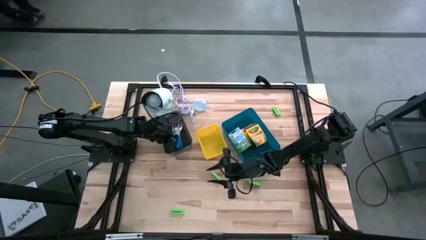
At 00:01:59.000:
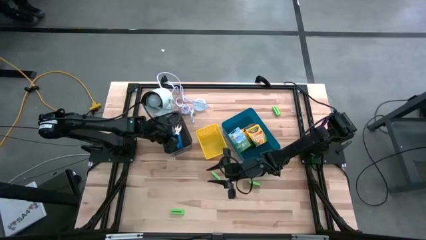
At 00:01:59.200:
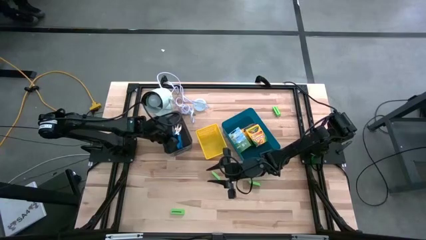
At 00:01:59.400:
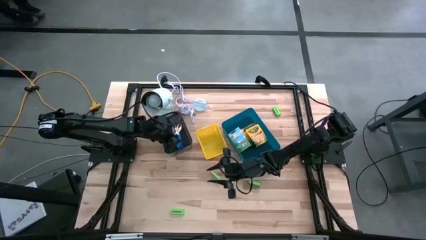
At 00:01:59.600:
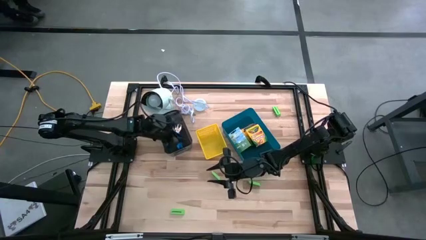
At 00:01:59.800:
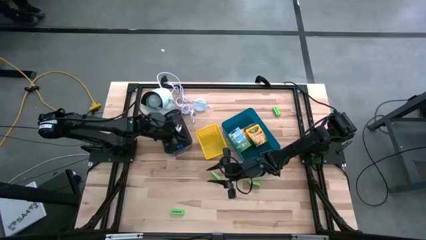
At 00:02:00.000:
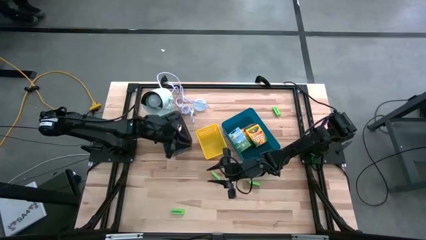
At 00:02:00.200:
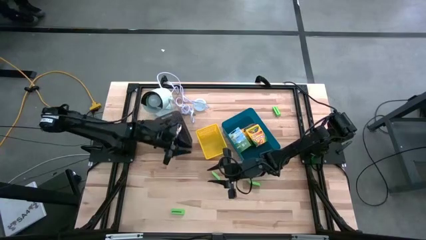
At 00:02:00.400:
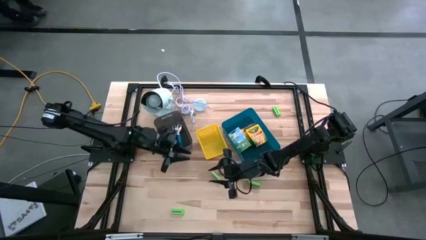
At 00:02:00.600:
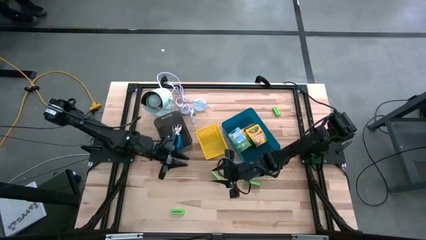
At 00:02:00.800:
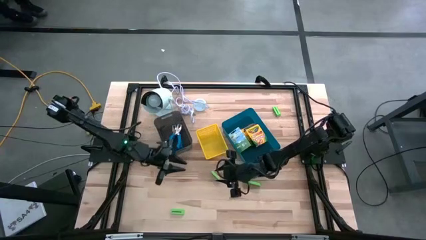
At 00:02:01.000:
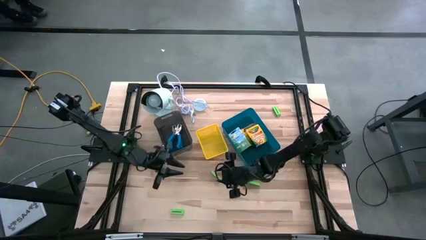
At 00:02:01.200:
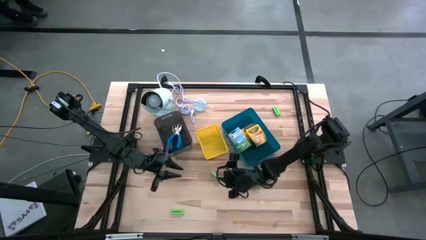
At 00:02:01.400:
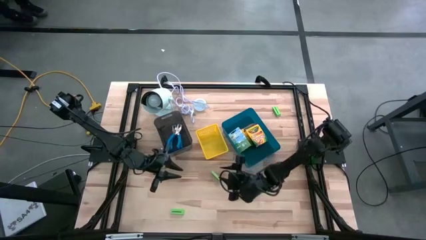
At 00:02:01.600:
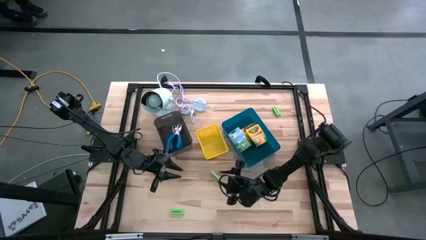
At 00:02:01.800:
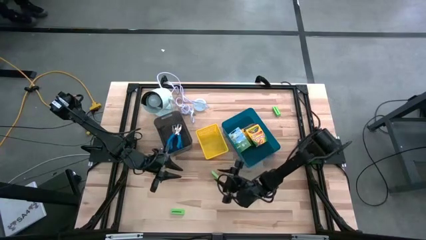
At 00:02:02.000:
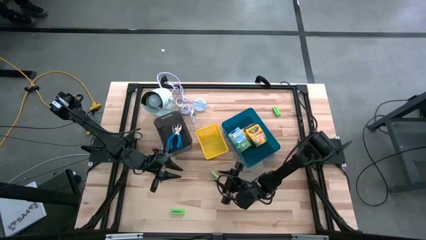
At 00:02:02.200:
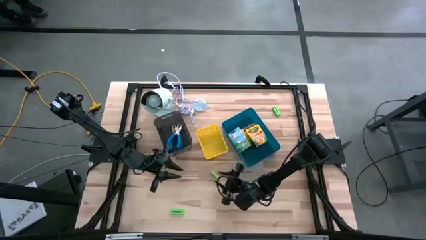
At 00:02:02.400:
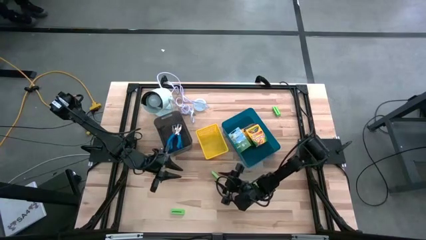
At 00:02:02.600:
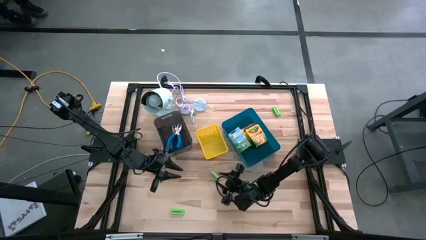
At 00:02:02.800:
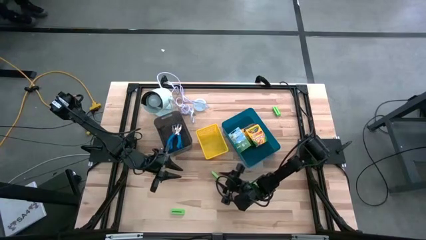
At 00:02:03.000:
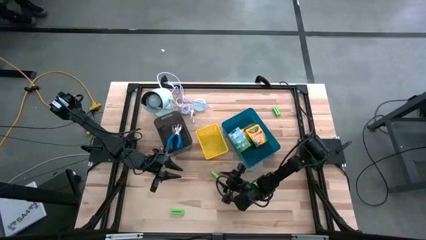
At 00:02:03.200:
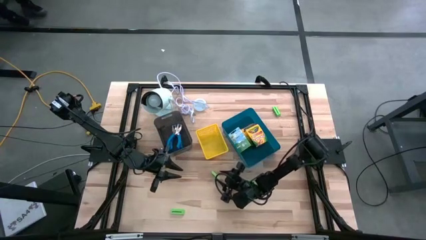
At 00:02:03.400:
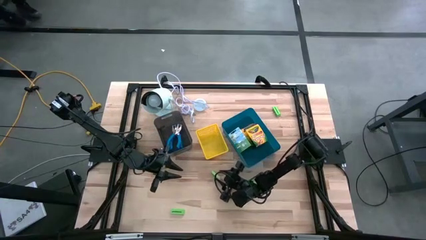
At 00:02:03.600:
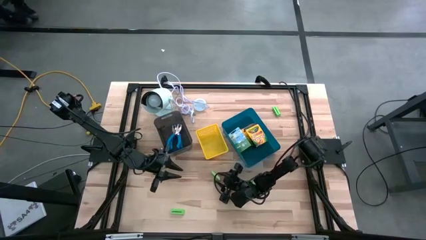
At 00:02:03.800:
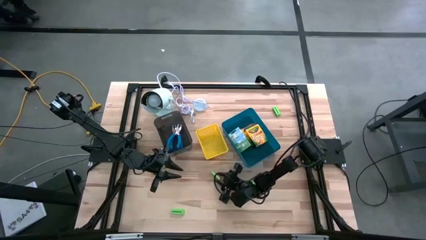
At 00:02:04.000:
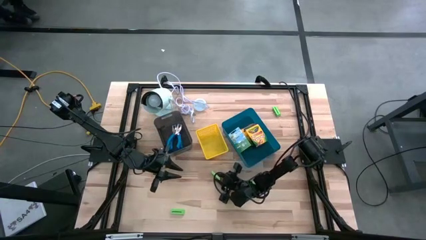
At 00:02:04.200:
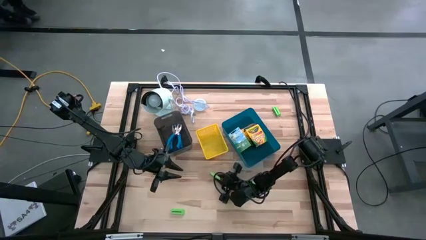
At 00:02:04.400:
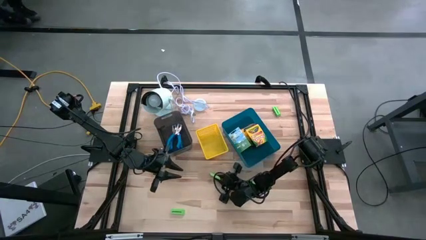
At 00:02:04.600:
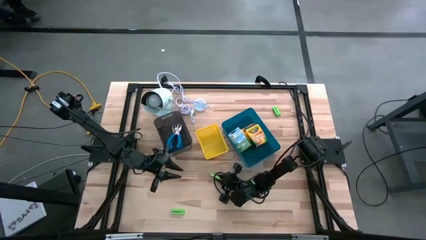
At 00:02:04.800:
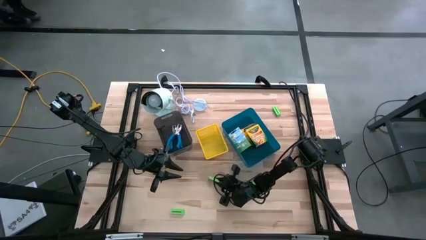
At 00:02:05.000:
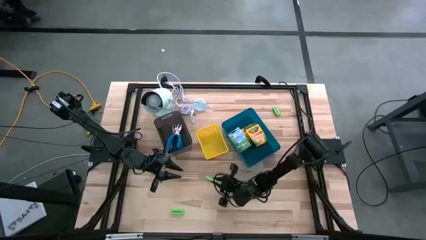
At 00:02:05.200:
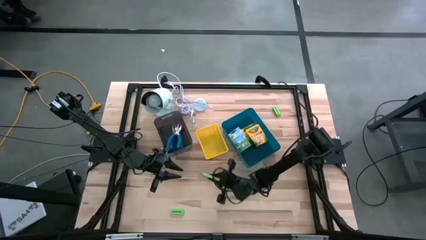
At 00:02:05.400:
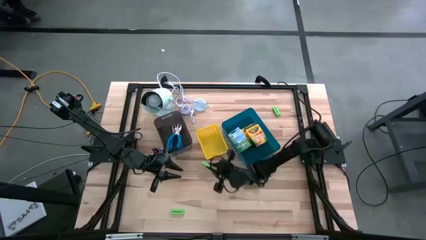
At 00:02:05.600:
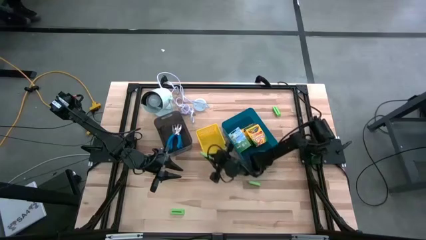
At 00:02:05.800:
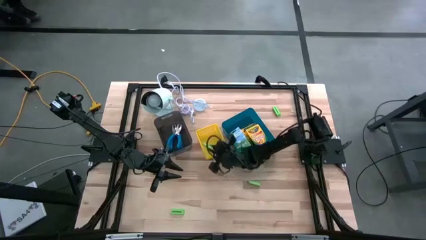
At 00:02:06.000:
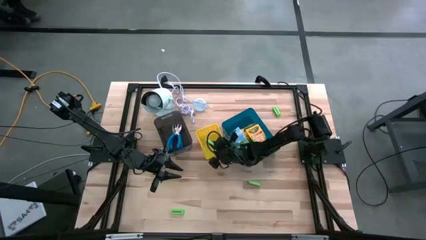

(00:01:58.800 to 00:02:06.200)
Task: Pick & Place School Supplies
Put the green eraser into the yellow bin

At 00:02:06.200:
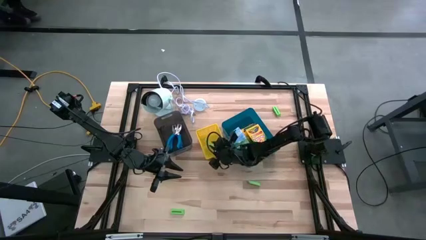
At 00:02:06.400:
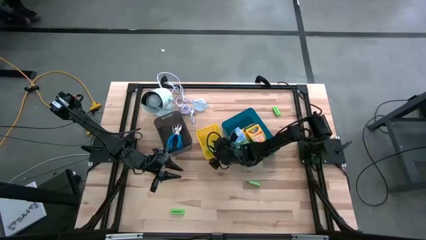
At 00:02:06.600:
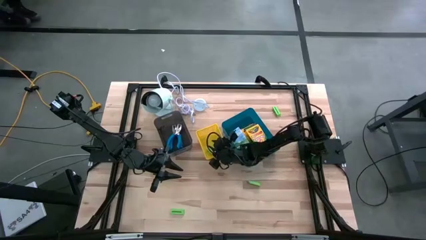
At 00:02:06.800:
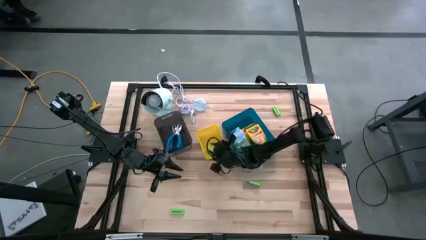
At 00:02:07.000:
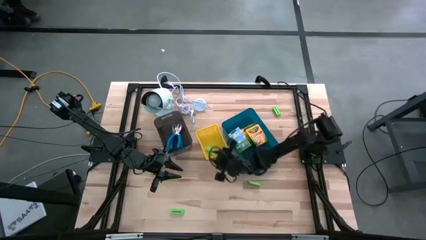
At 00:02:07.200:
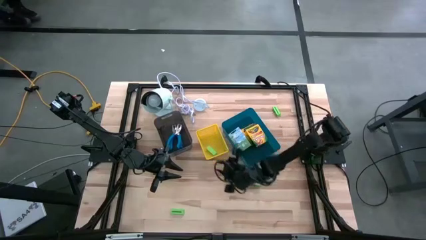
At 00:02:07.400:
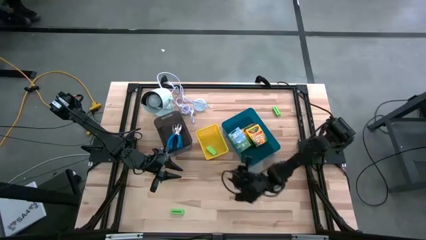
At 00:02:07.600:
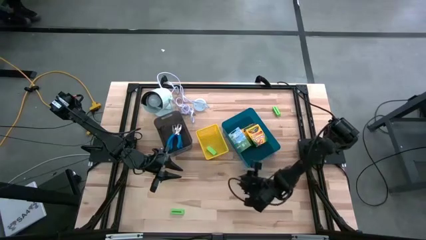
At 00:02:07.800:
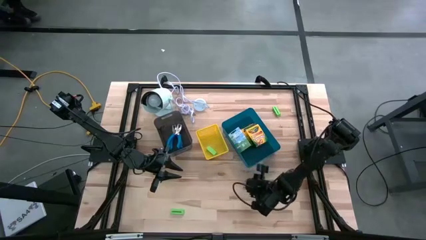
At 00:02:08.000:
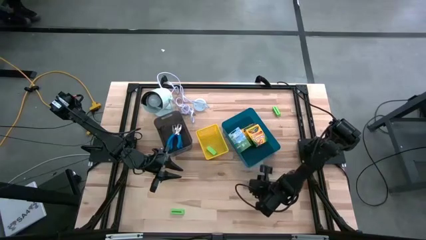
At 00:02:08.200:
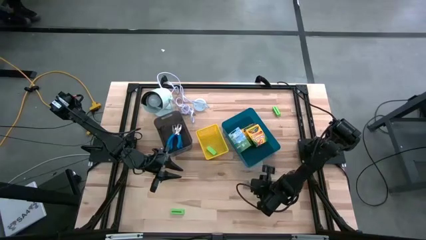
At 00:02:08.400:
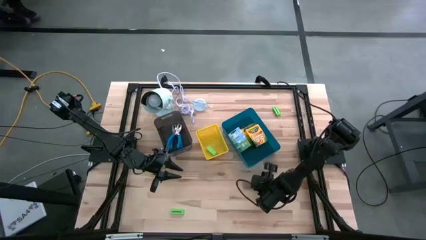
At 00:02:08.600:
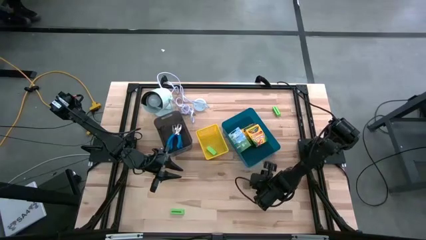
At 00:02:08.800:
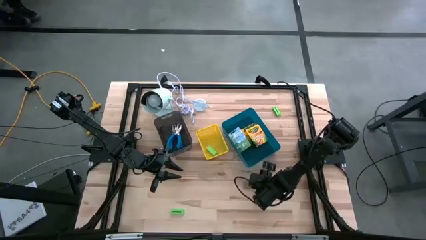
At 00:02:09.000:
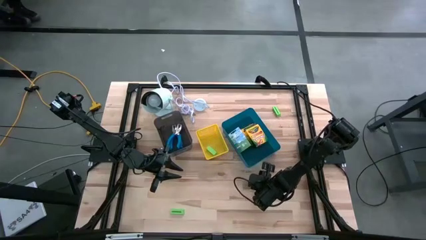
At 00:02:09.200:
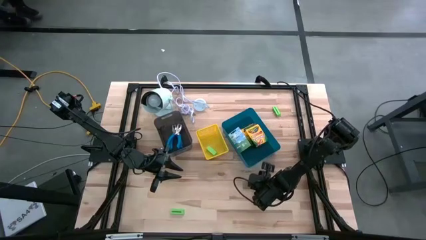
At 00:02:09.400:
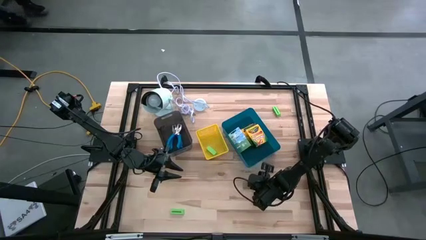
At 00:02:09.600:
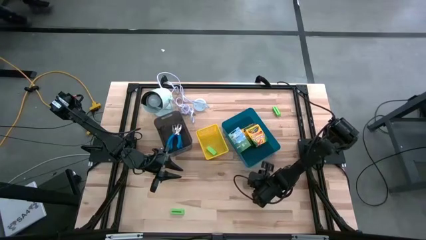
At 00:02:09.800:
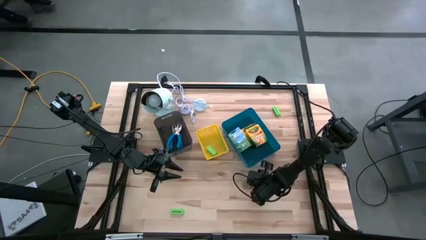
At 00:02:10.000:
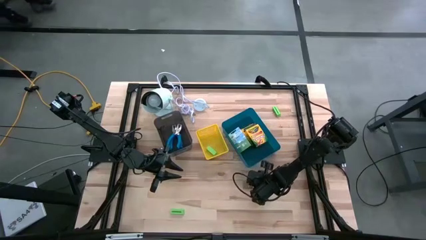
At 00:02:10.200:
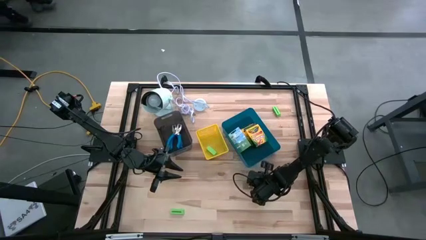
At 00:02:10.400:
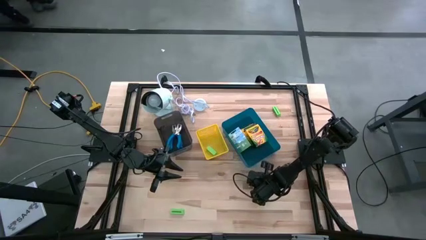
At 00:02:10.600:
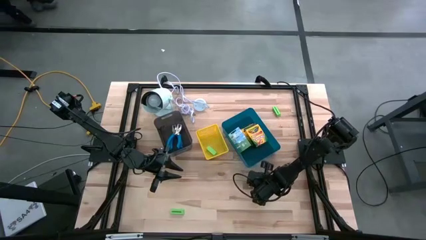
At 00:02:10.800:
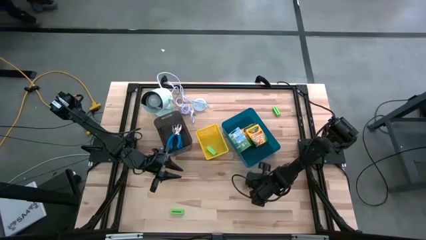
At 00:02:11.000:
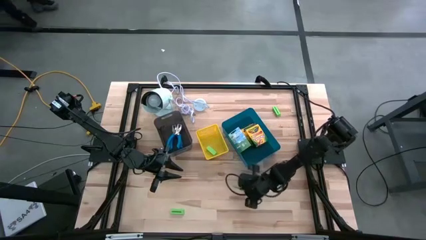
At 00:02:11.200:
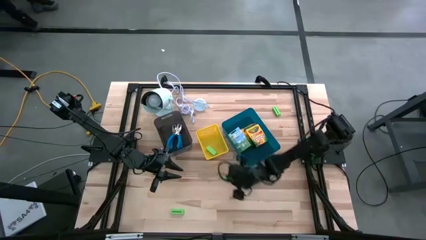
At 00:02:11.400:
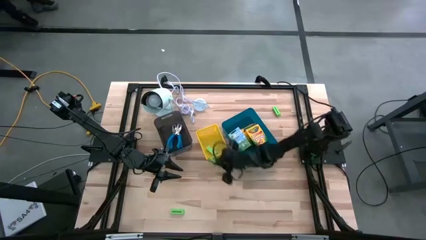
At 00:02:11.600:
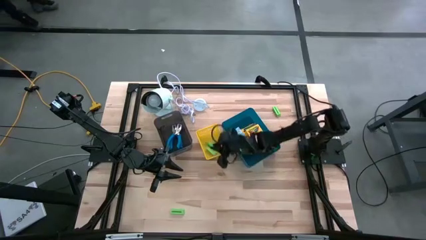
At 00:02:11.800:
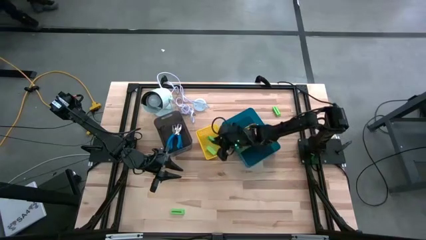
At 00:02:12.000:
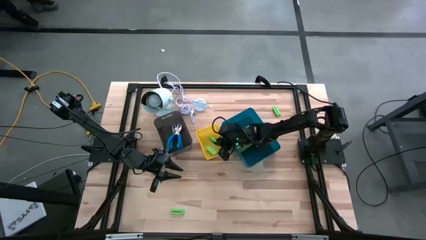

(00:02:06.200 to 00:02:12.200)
Put the green eraser into the yellow bin
